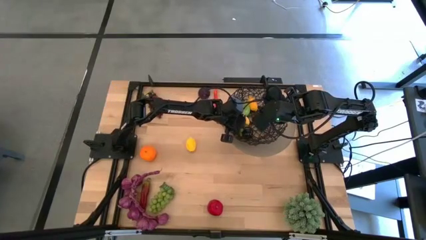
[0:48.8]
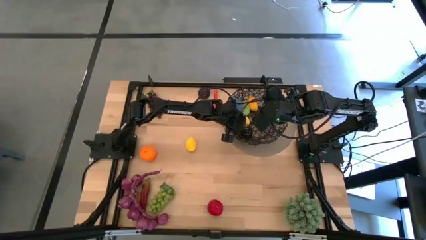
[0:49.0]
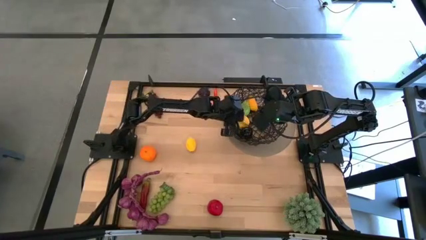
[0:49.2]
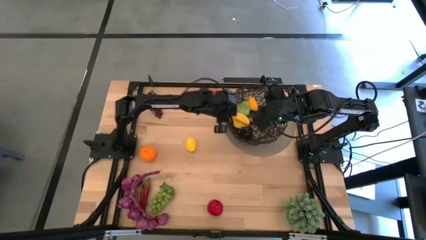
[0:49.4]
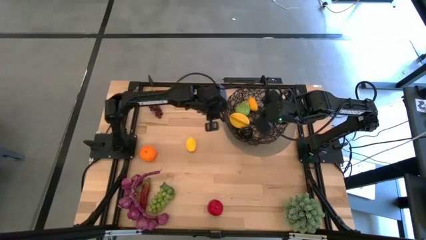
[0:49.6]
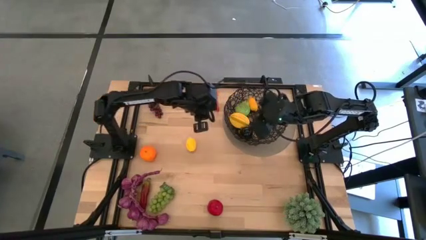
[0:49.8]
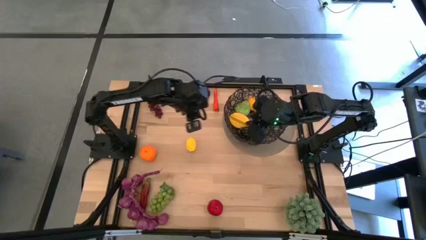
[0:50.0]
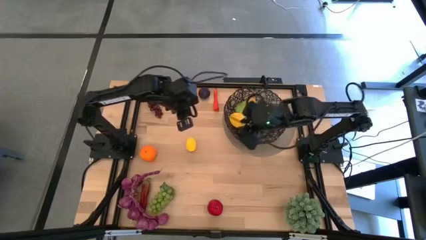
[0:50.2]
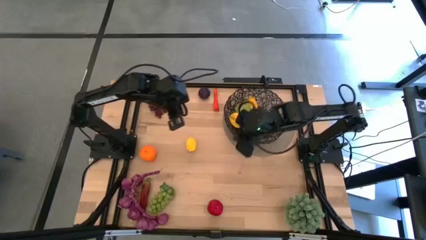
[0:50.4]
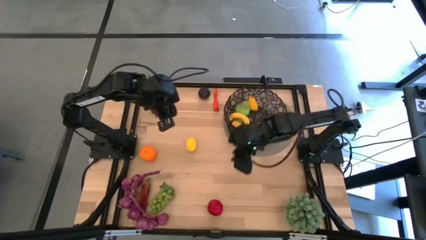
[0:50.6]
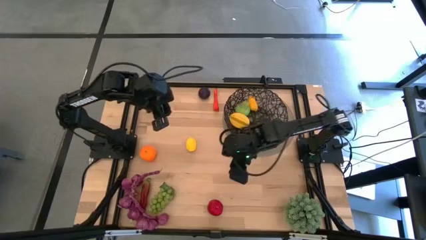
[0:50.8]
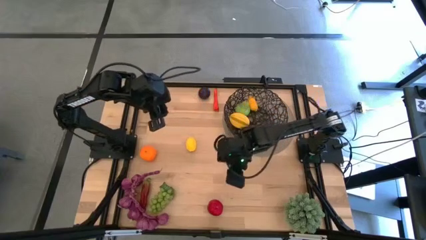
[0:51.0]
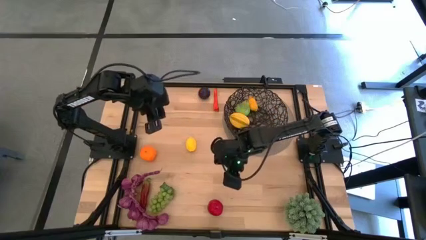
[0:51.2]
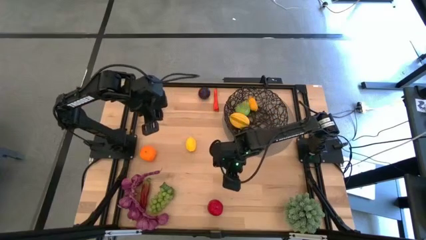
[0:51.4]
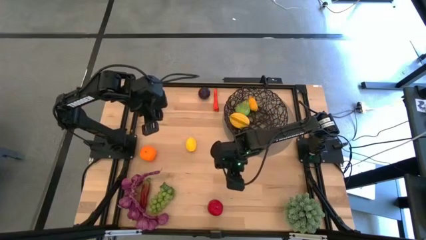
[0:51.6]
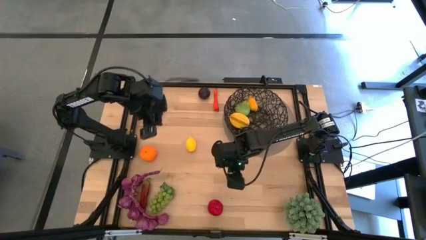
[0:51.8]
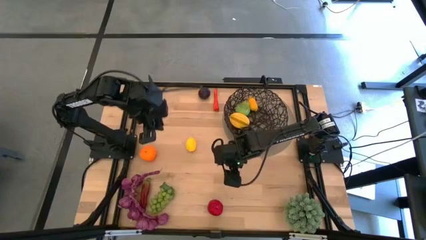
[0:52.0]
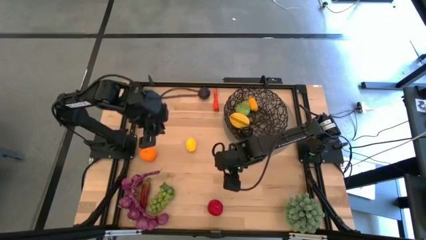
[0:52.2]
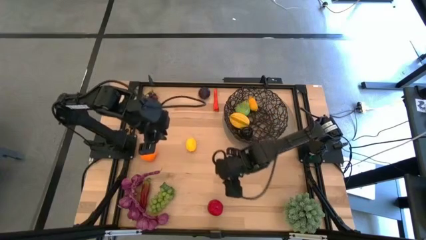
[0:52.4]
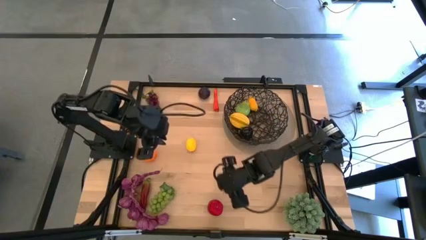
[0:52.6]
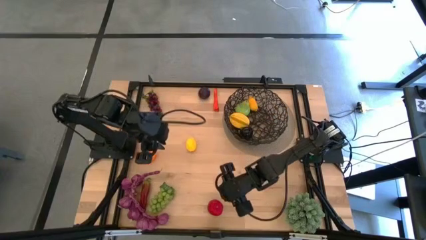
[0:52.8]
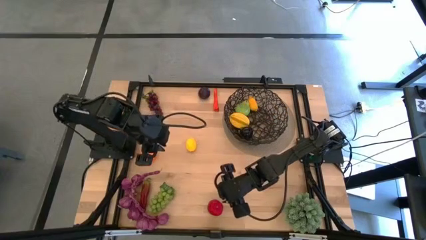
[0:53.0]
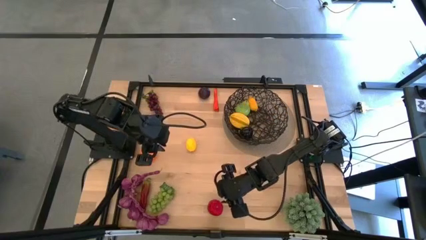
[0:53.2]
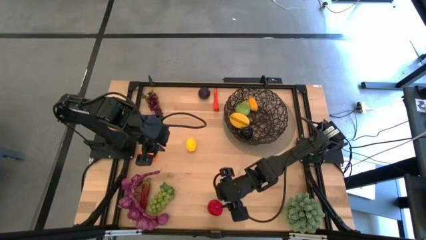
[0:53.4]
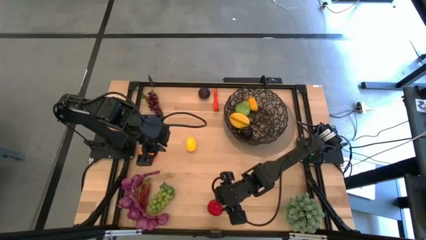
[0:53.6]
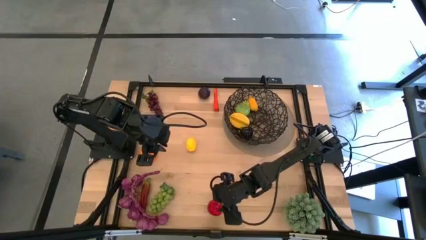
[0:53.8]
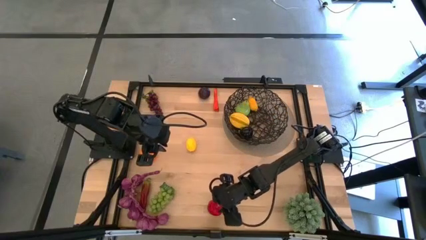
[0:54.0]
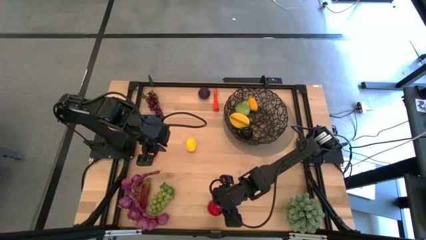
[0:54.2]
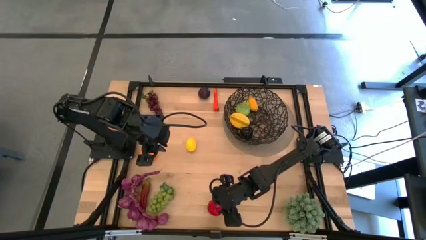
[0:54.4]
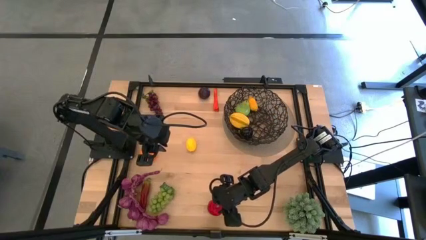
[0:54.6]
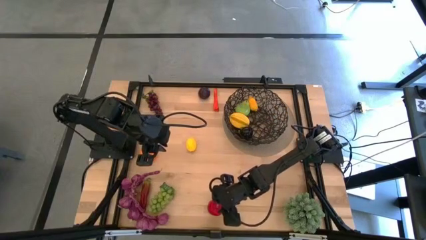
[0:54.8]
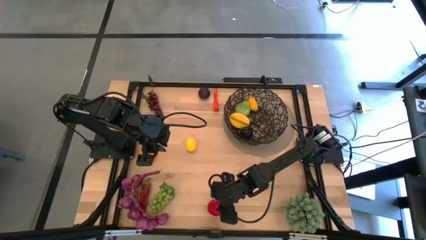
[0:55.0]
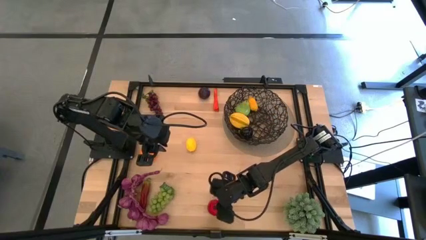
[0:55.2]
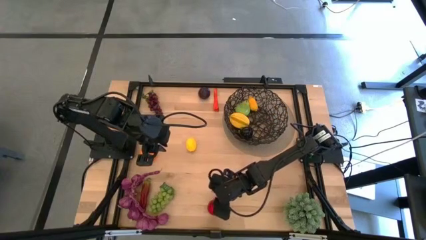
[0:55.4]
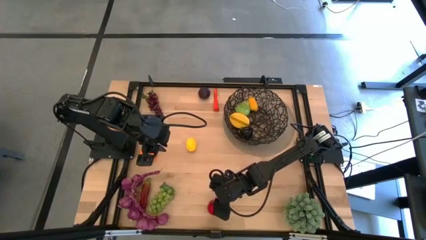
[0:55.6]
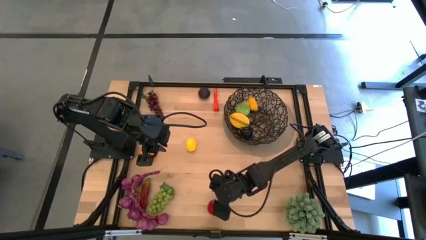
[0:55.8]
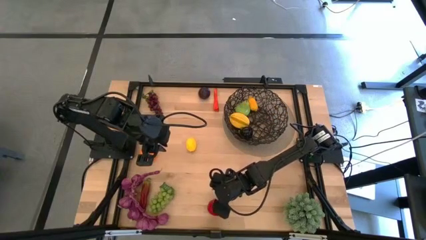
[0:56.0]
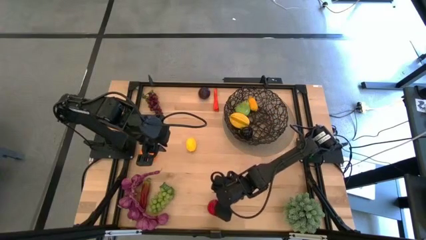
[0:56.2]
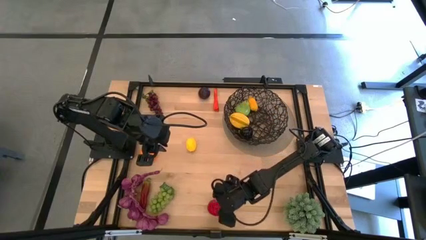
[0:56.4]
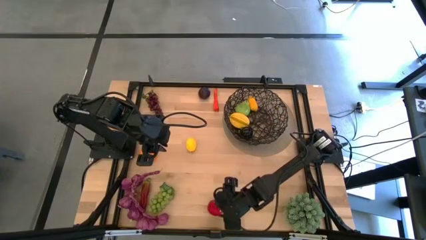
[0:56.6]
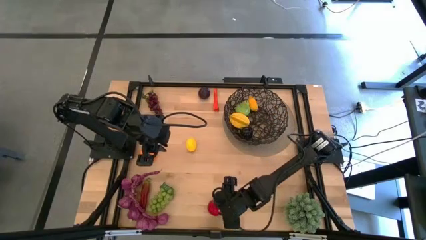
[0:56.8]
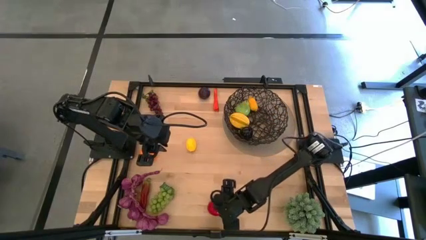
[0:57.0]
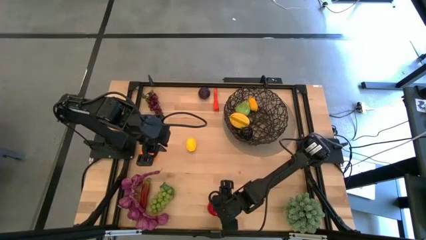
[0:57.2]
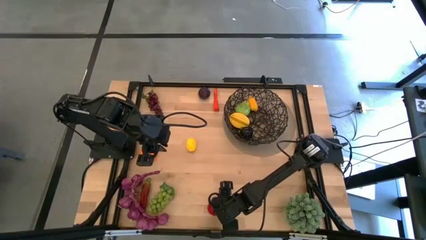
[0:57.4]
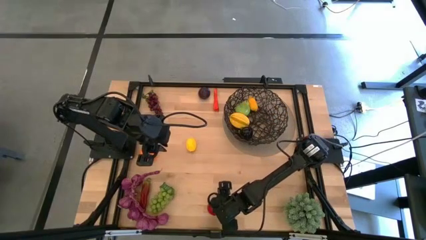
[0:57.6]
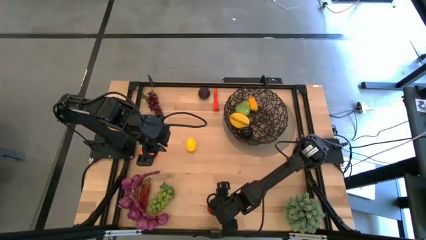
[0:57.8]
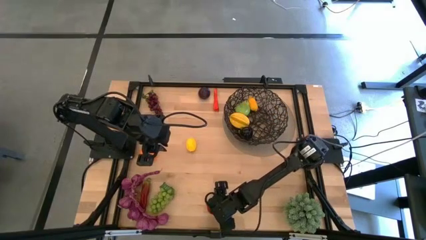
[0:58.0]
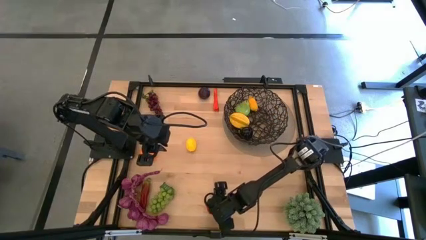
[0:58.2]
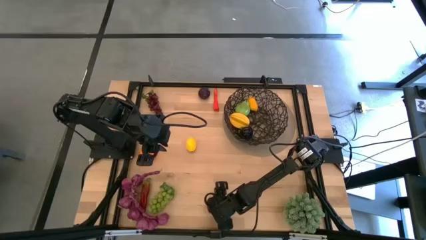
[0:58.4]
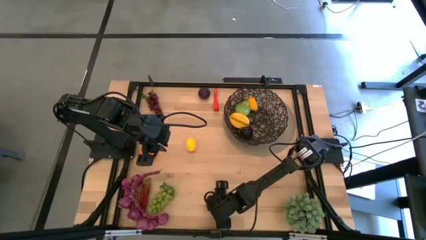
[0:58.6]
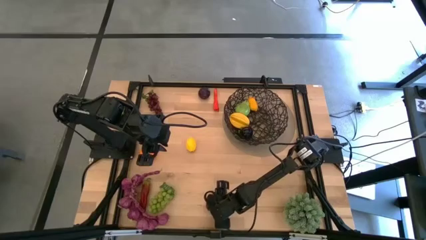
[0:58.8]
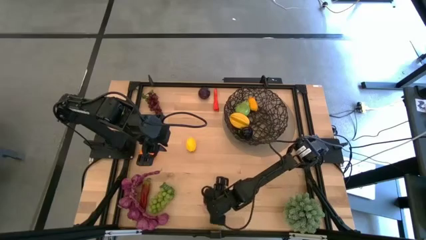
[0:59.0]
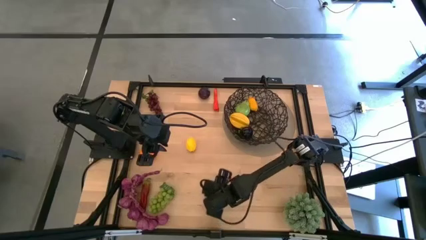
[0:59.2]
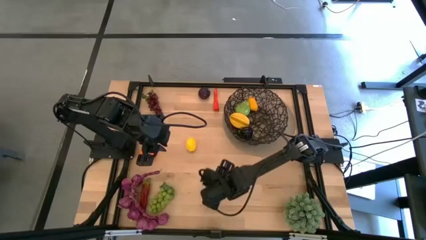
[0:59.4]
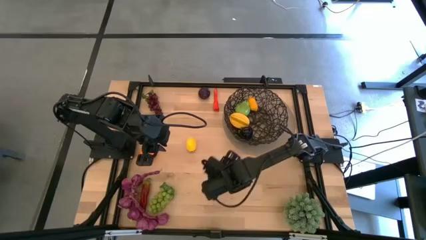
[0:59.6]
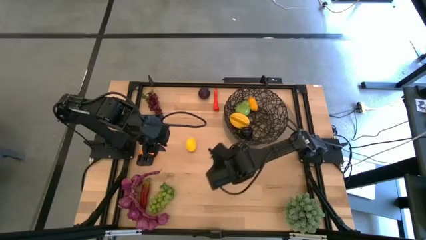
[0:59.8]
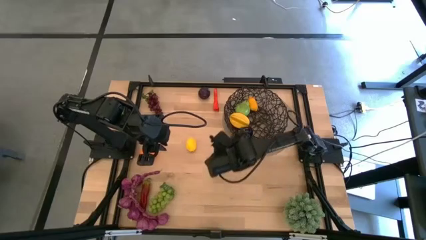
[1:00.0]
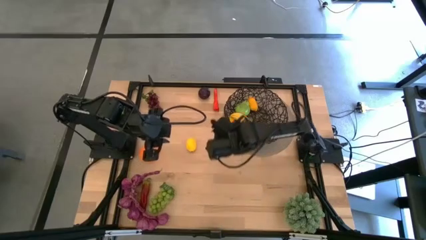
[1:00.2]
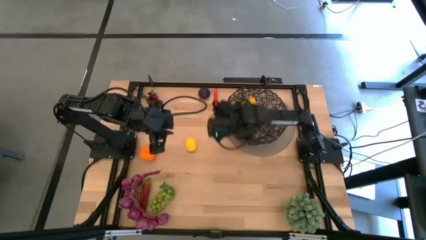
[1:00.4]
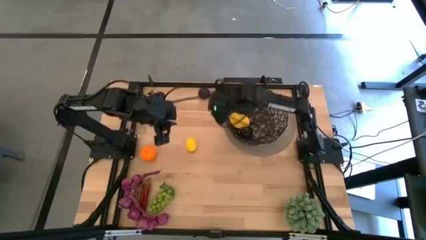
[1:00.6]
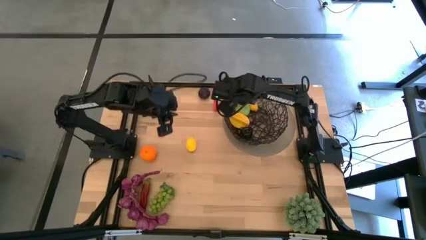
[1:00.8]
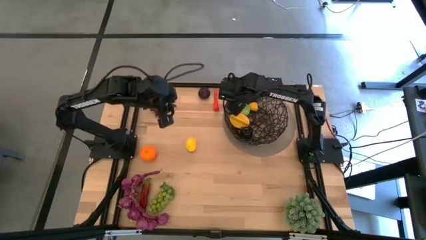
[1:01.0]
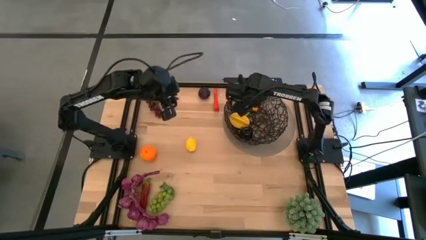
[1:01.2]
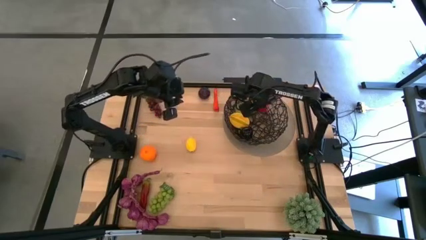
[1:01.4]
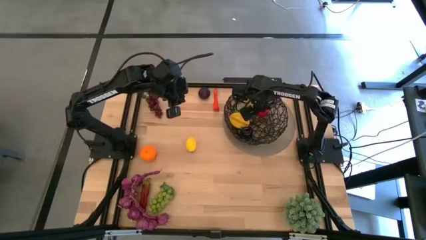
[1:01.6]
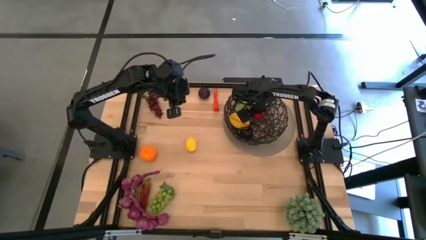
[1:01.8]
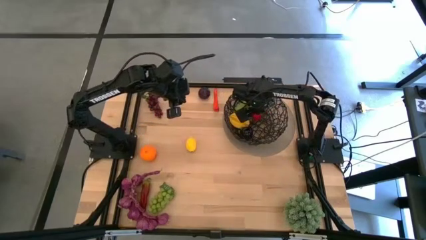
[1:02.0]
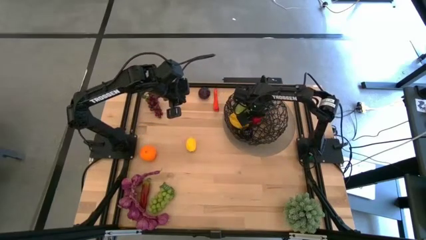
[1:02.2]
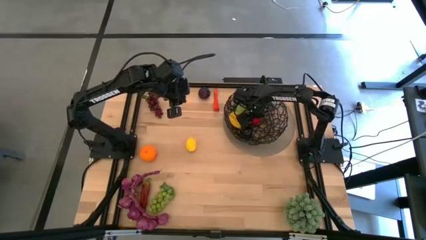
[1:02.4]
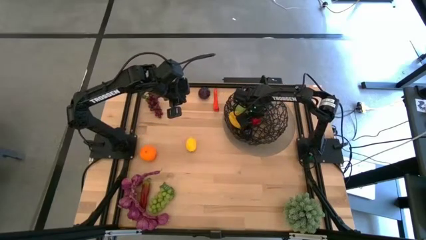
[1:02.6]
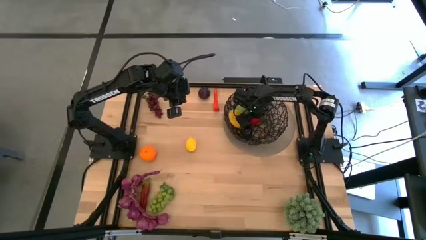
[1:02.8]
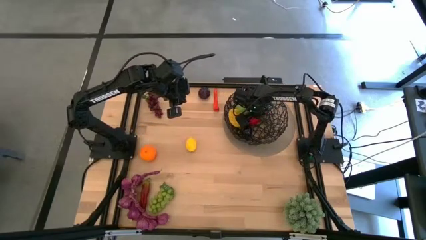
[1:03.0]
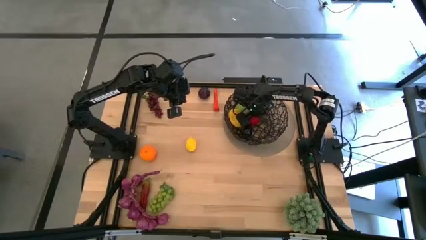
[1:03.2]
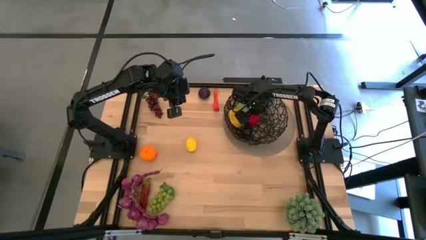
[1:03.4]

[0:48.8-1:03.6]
Task: Build produce basket
Put the tomato into the black wire basket

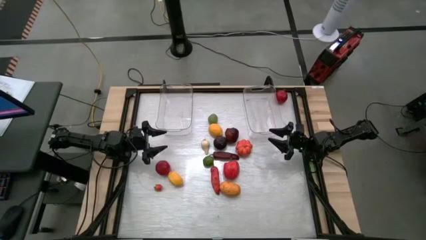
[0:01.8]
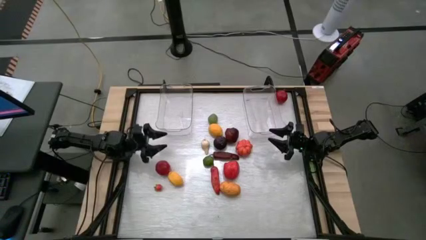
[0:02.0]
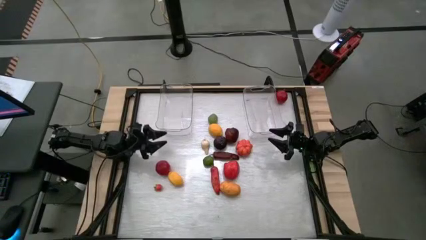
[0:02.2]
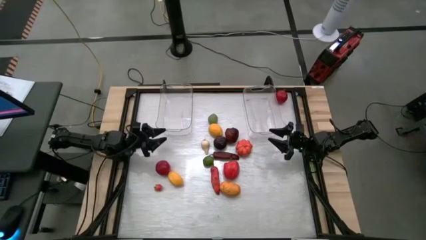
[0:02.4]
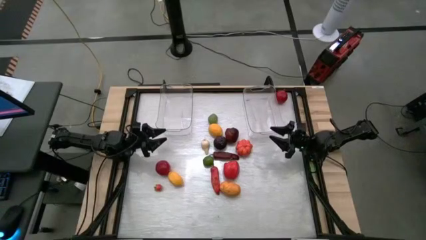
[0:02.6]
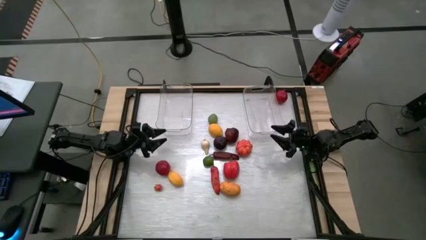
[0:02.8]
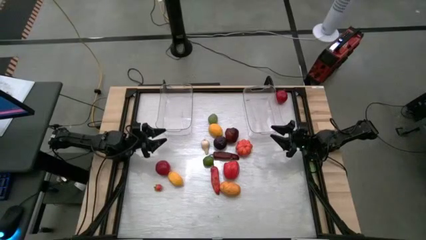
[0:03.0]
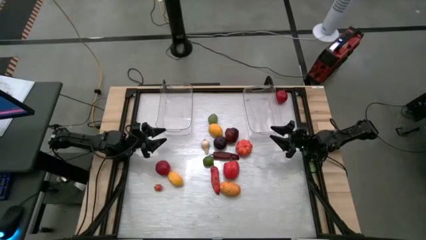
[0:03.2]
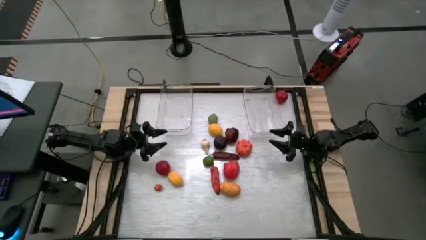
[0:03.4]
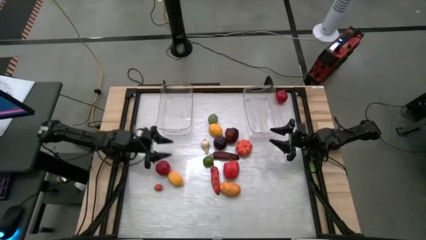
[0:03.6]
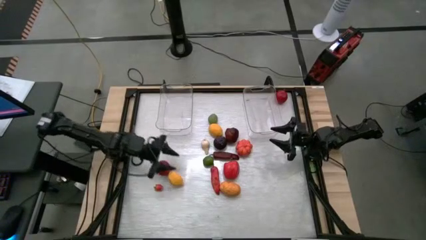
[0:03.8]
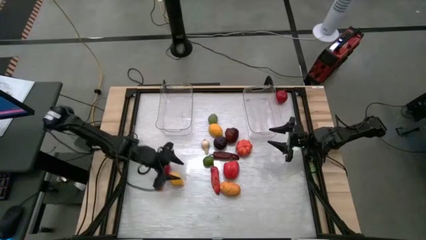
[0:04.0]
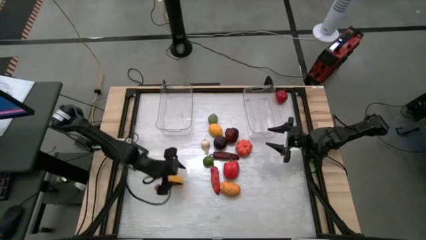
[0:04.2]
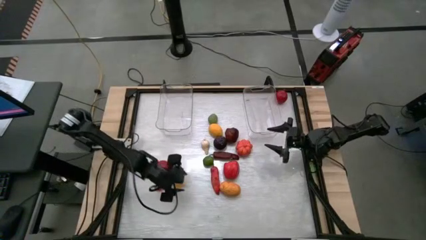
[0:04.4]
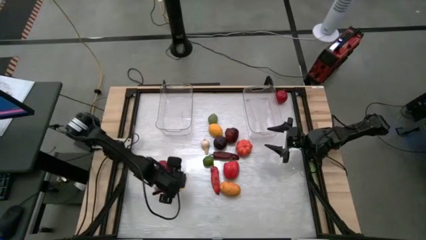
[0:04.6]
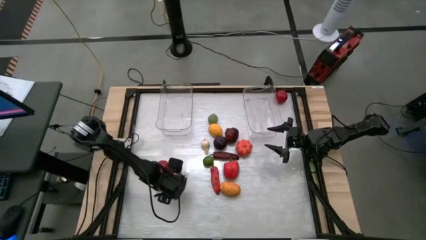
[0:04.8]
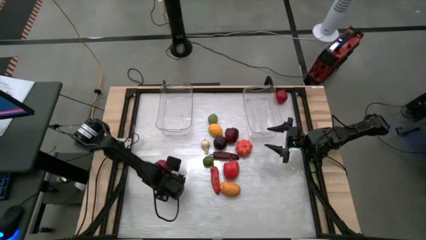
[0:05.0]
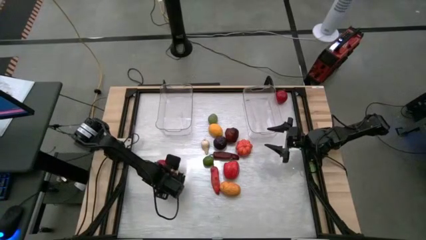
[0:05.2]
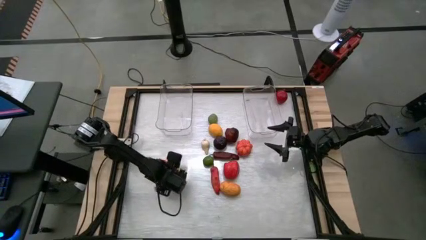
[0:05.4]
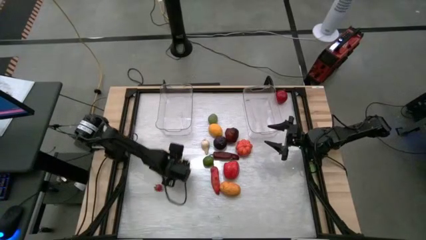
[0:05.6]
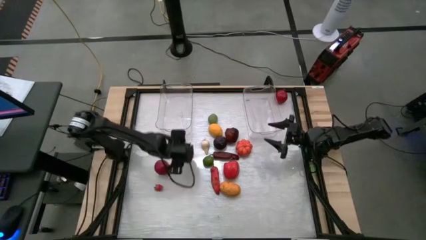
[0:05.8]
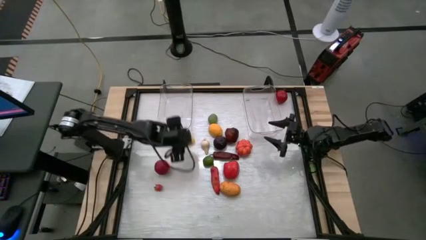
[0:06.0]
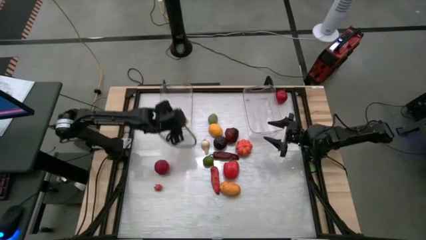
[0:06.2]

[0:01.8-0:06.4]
Task: Sort produce into baskets
Put the bottom lemon into the left transparent bin
